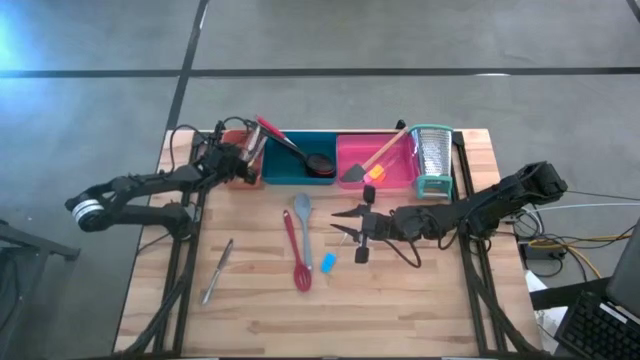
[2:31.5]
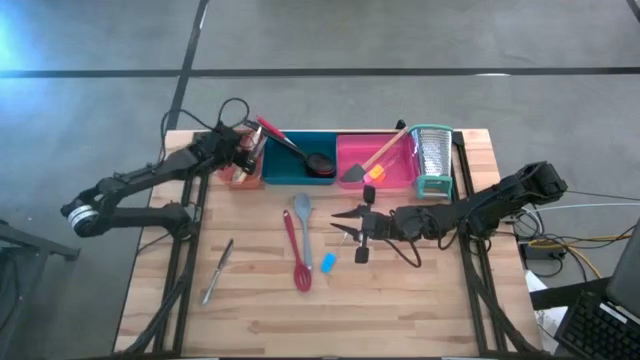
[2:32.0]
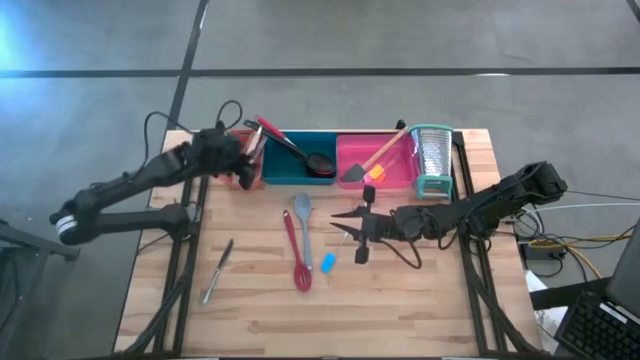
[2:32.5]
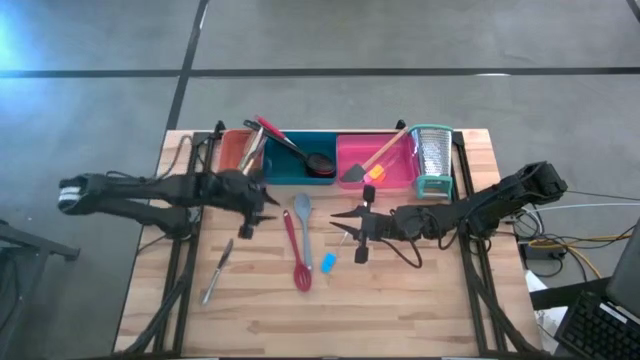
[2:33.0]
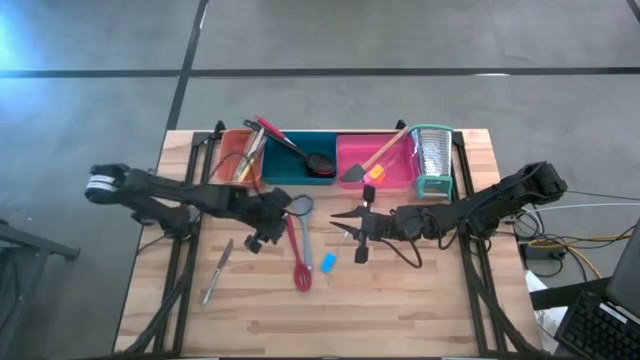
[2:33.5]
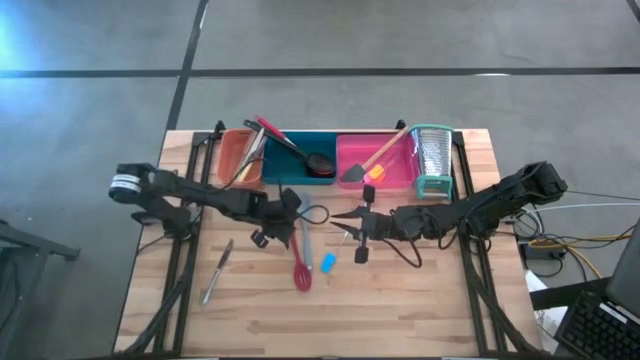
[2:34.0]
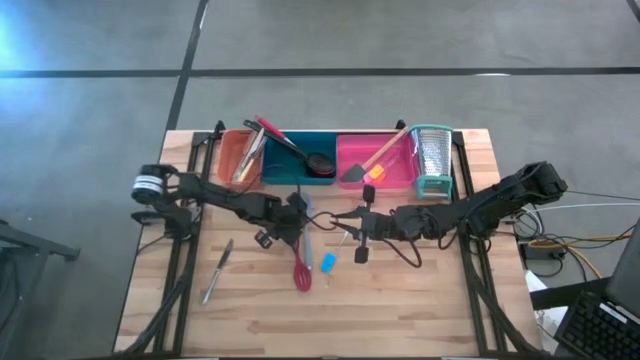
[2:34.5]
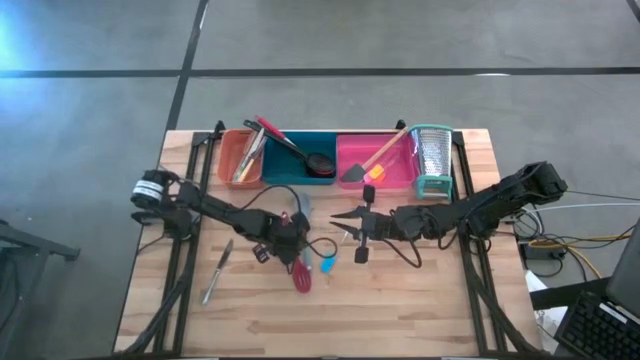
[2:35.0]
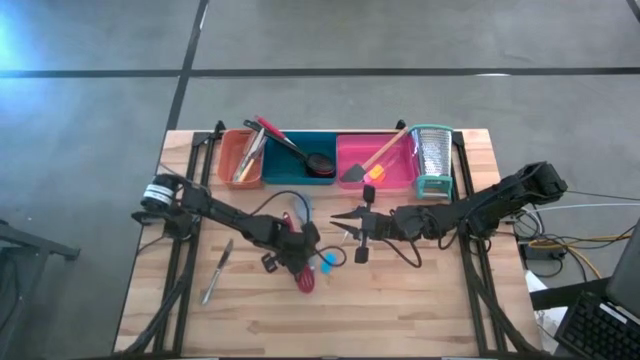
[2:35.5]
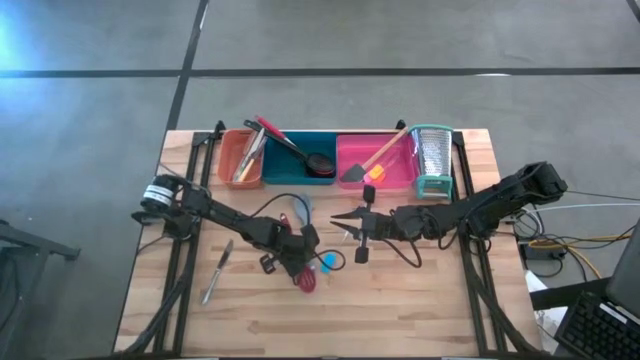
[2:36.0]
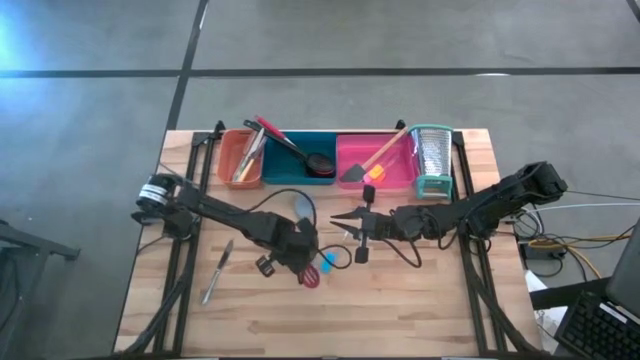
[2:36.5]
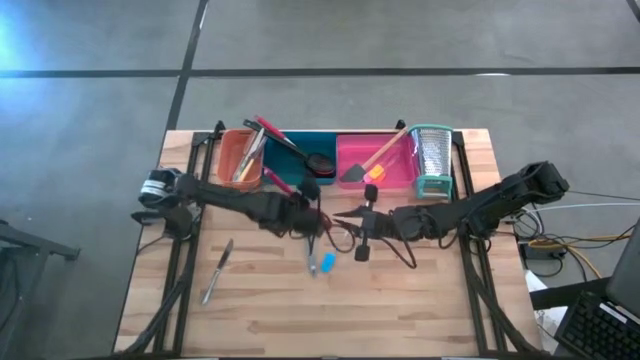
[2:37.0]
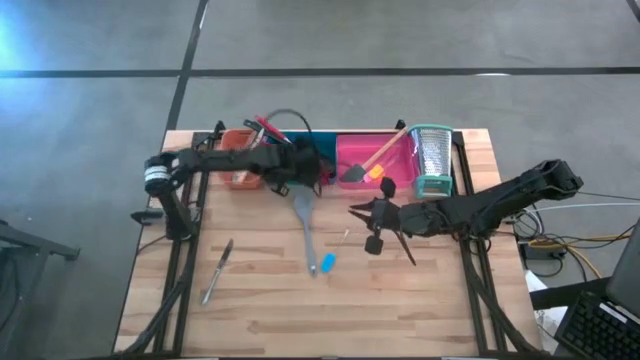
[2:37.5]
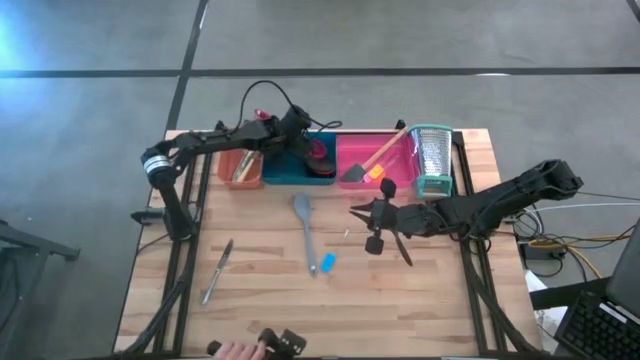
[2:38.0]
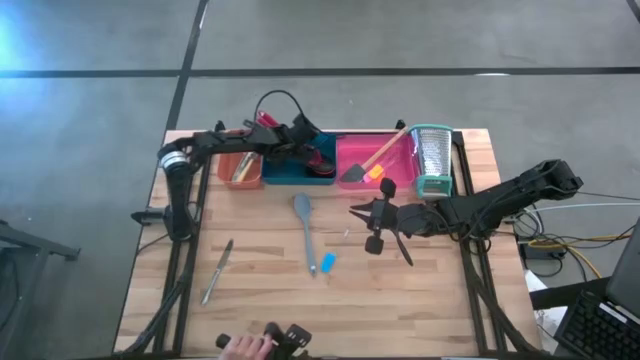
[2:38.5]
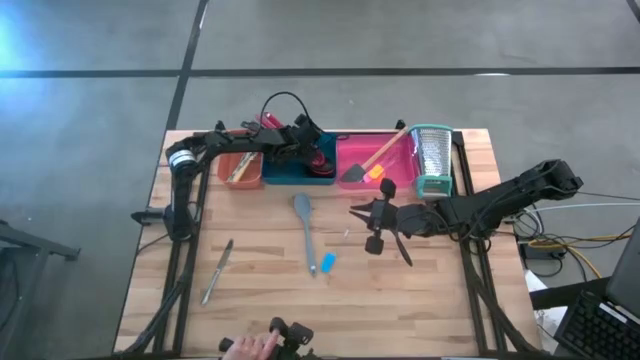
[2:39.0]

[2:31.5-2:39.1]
Task: Pick & Place Kitchen Items
Put the red slotted spoon into the blue bin

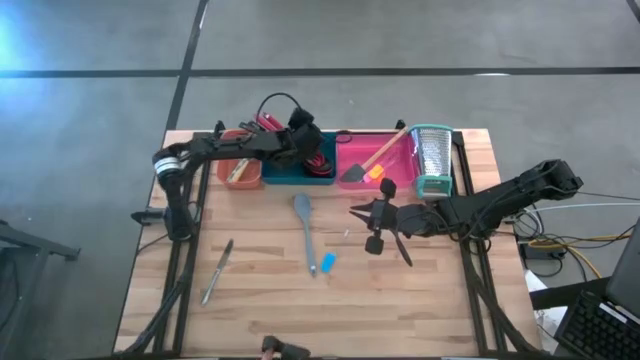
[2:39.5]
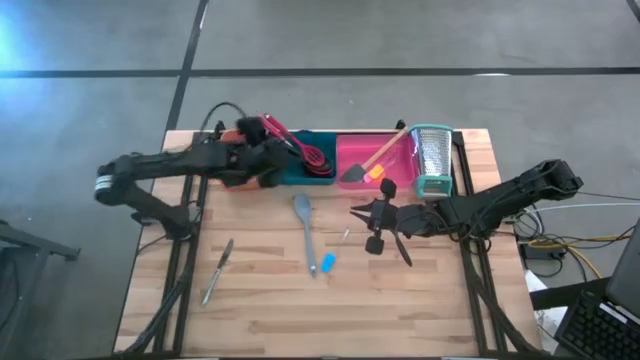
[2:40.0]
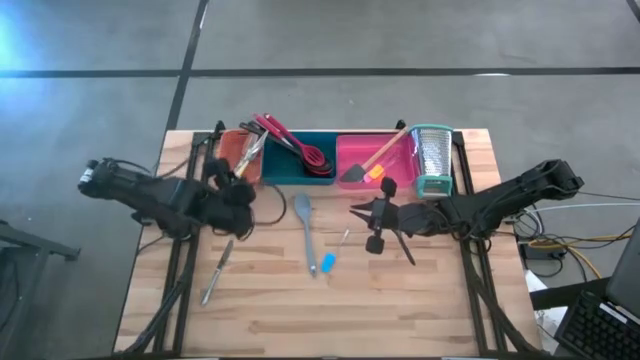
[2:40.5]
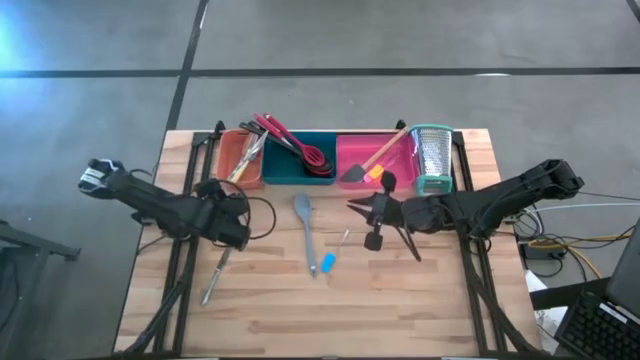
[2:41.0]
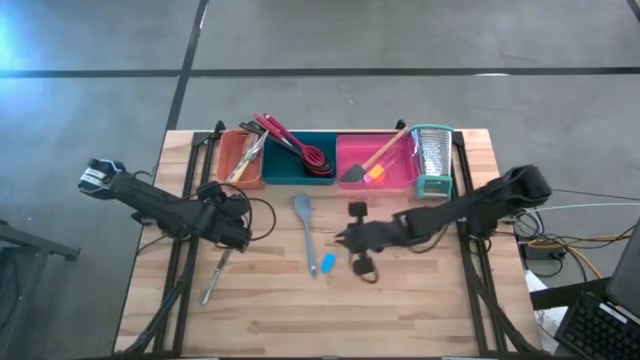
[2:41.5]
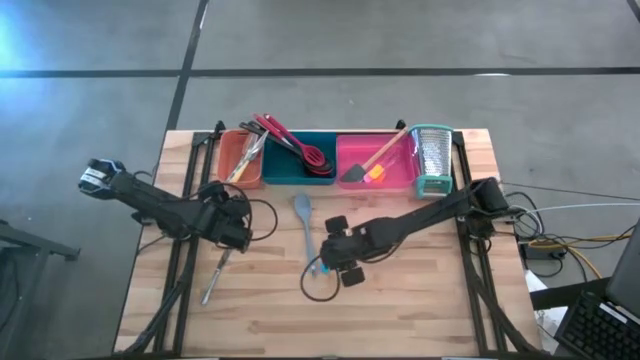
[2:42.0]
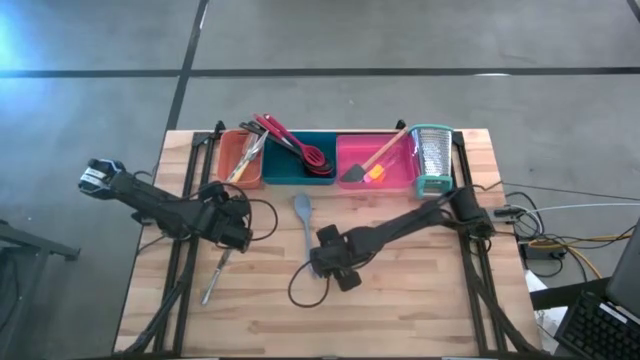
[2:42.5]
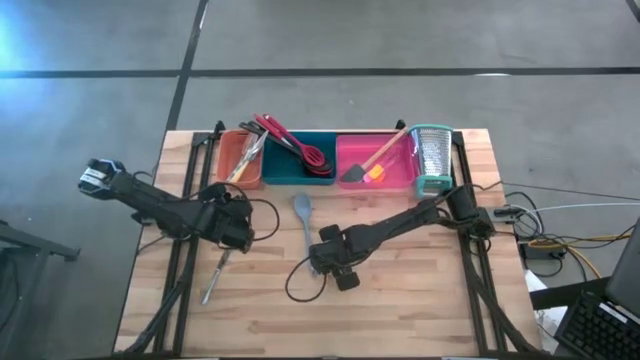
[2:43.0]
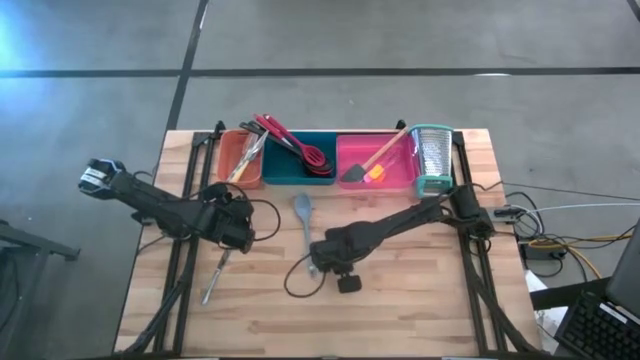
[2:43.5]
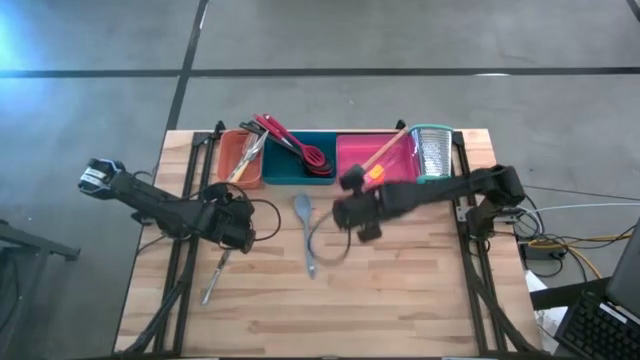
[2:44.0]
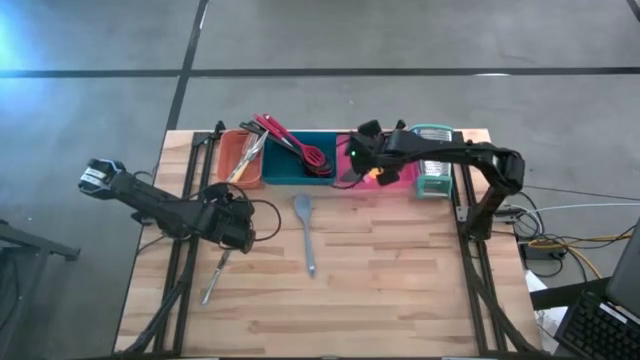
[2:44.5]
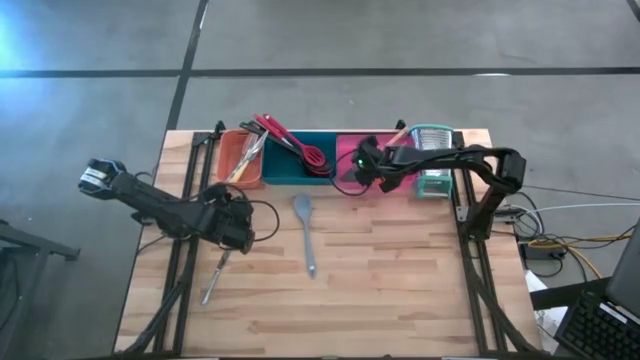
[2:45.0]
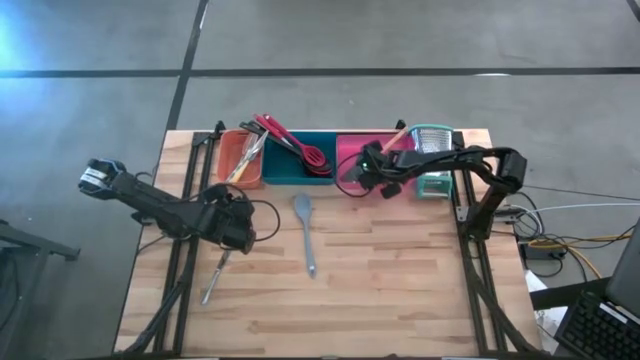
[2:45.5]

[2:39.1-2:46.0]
Put the blue spatula into the red bin

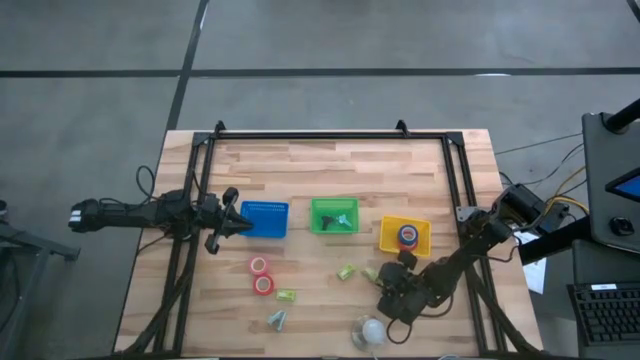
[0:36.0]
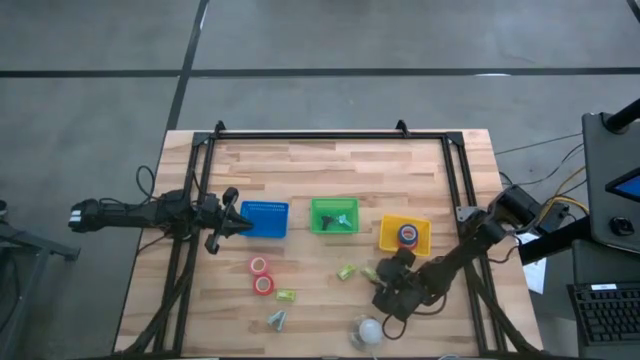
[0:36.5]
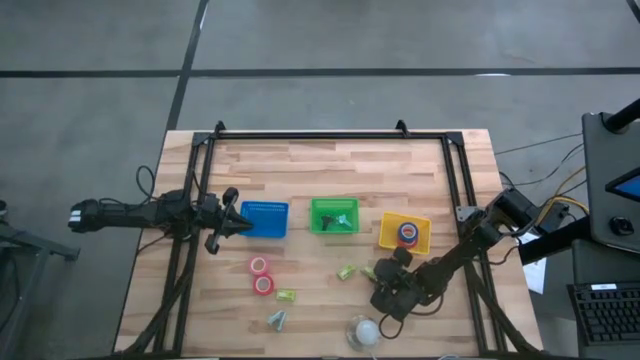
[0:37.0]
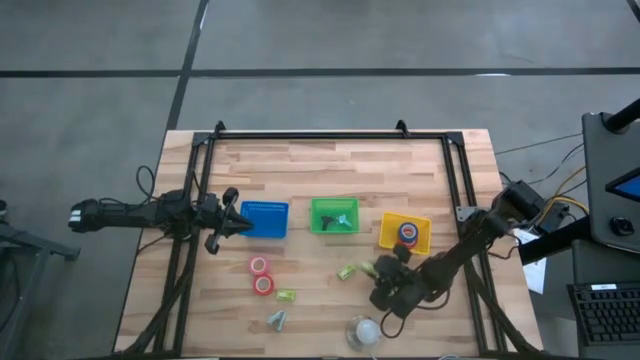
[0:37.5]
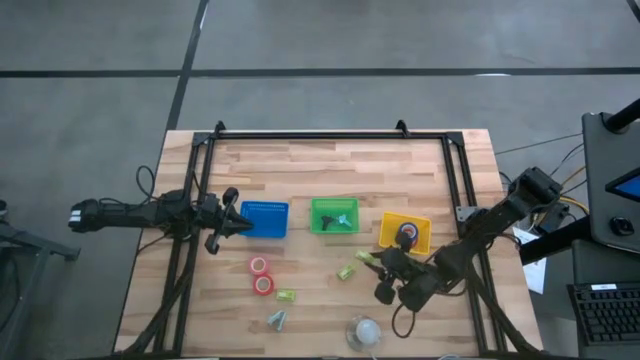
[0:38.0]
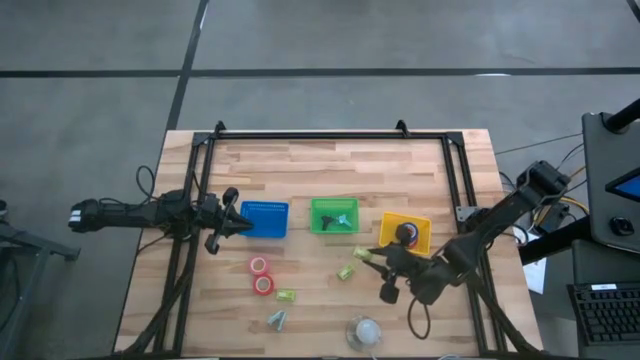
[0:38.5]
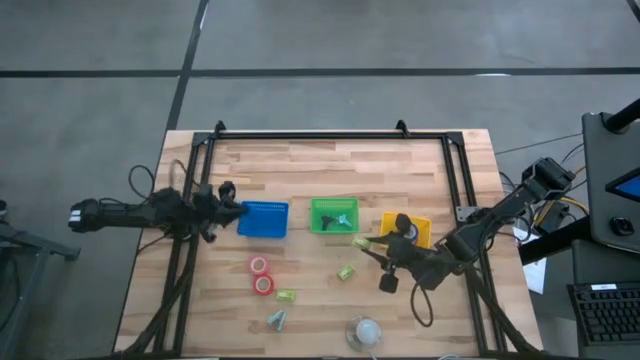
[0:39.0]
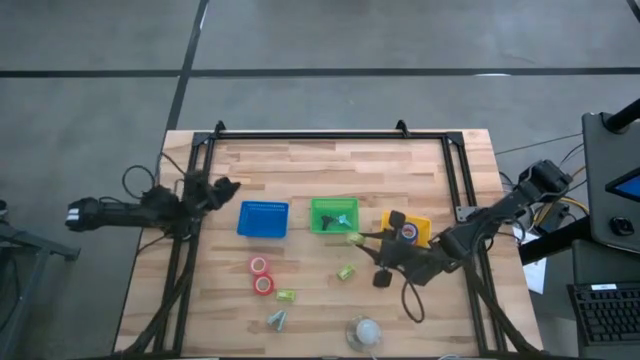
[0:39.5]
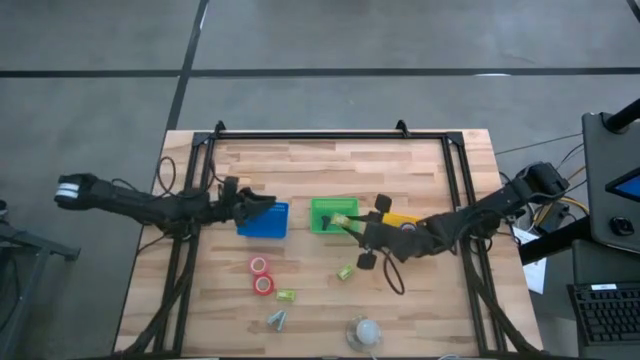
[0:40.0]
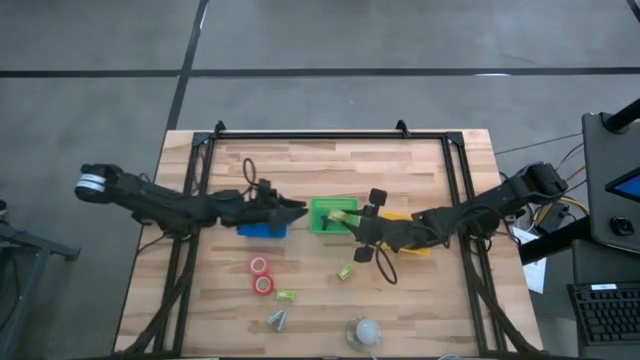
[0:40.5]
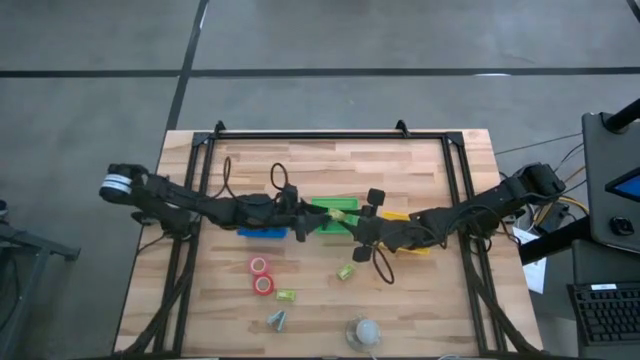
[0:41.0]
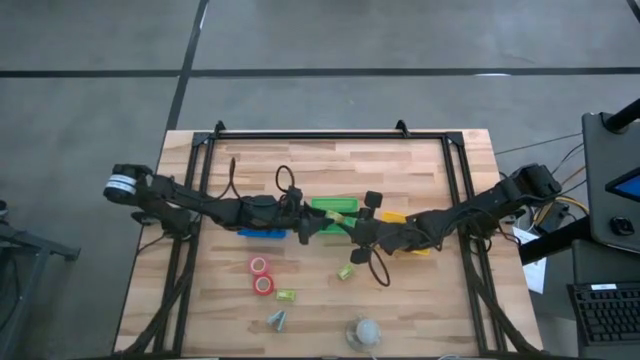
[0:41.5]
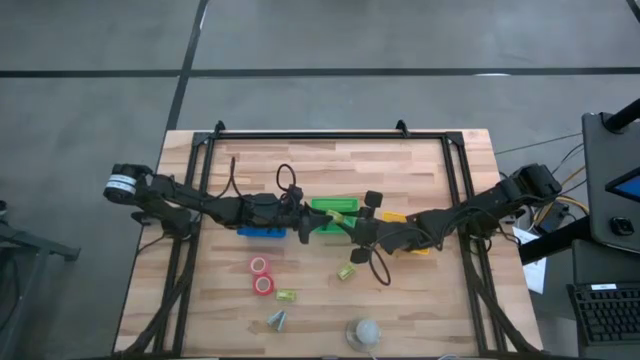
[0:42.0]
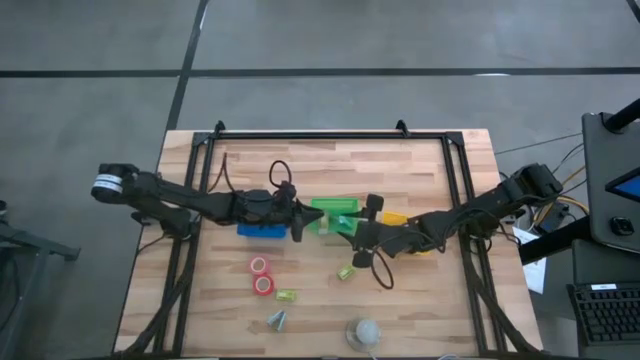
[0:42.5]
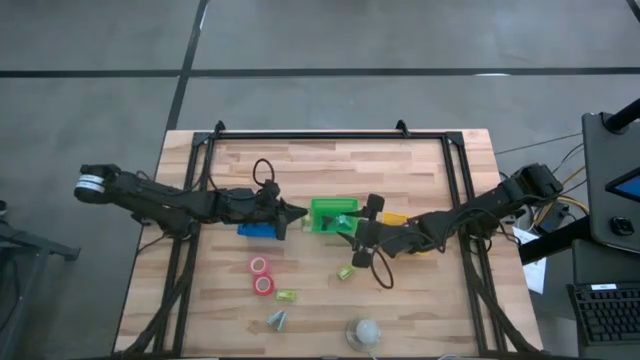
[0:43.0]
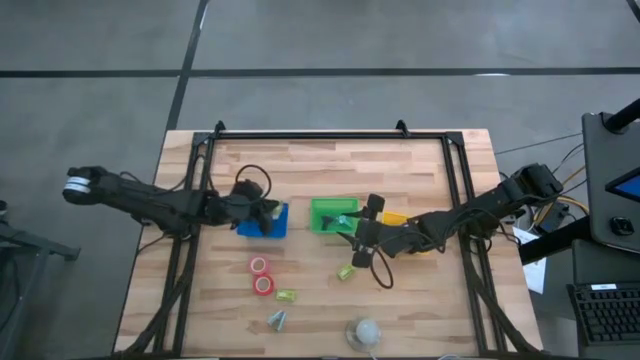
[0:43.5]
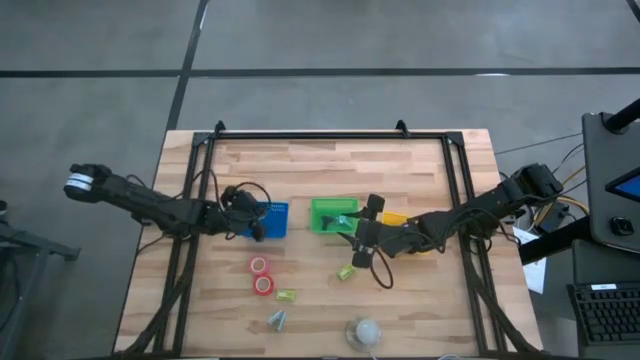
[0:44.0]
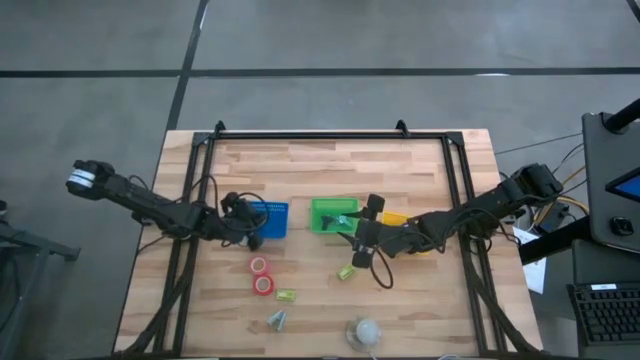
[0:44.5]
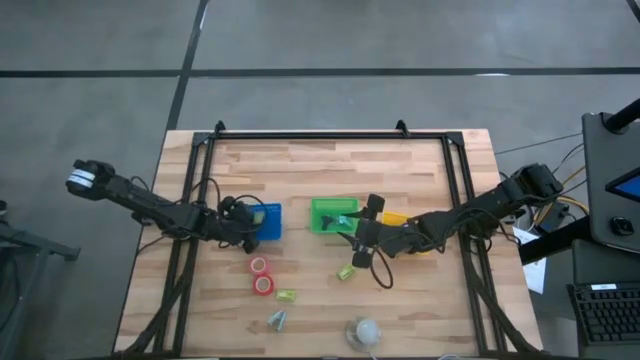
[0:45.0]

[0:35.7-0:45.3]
Task: Pick and place Stapler, Stapler remover, tape
Put the top right staple pin box into the blue bin
